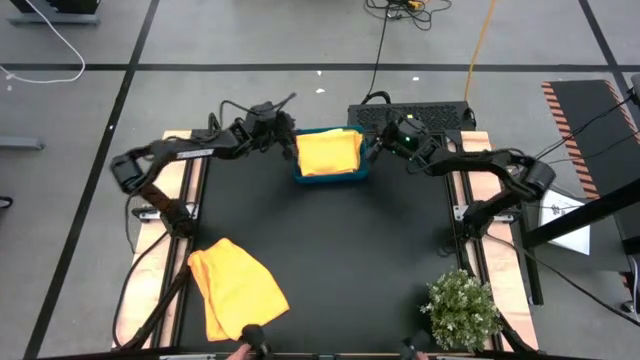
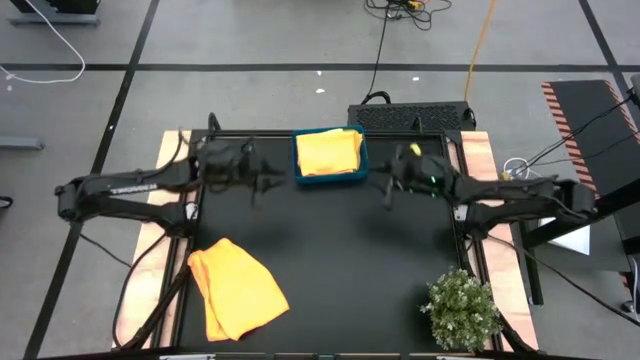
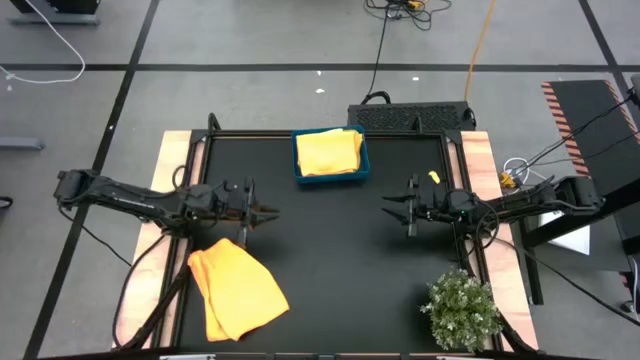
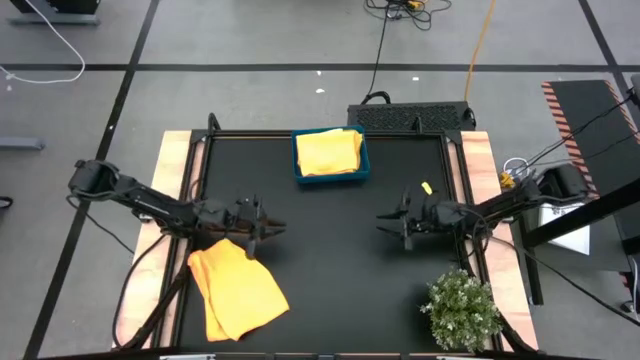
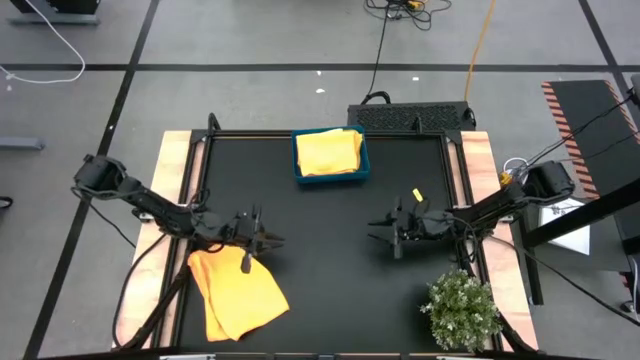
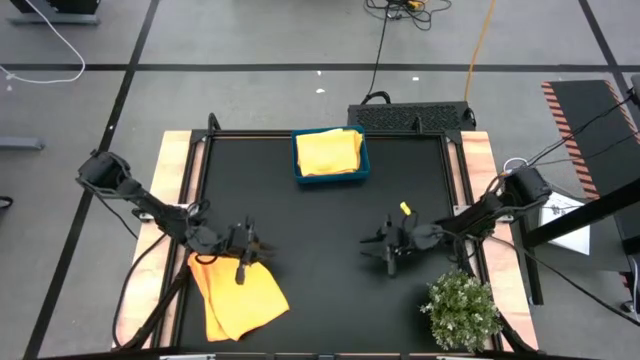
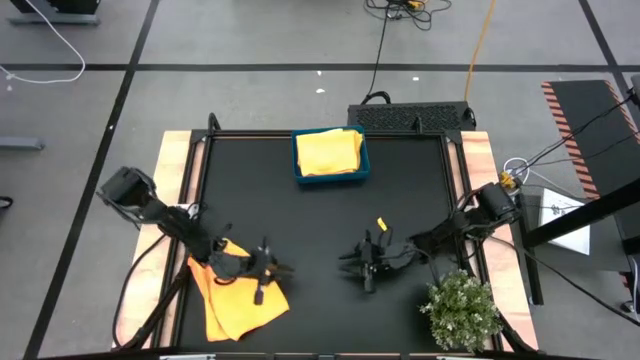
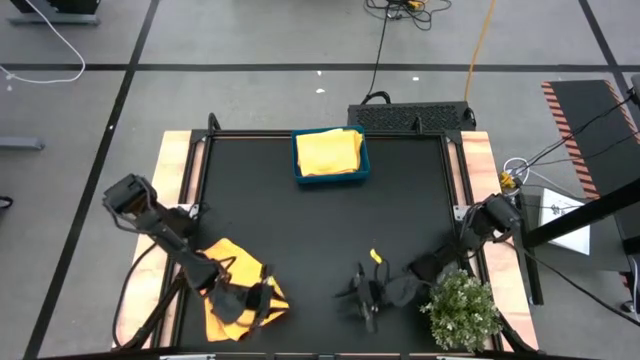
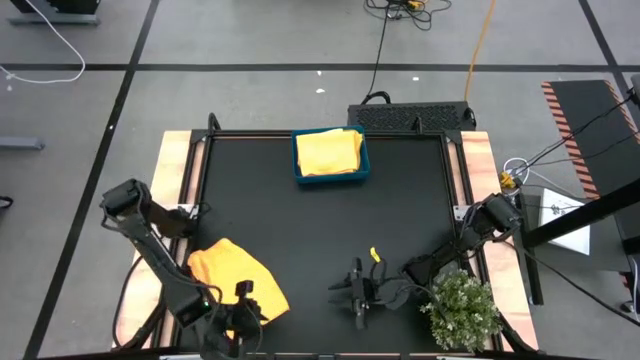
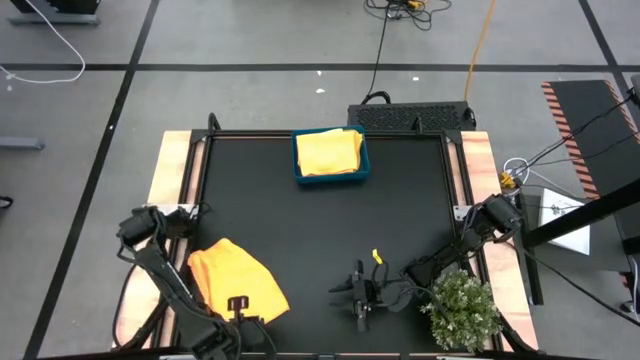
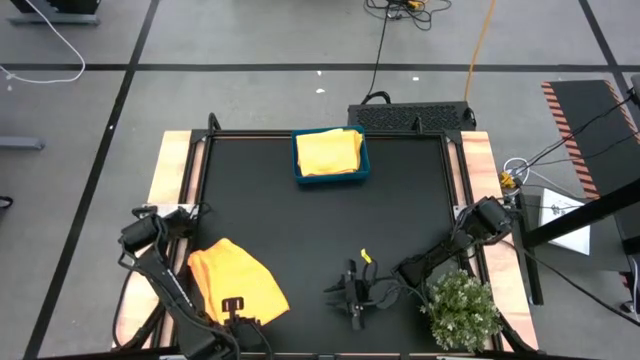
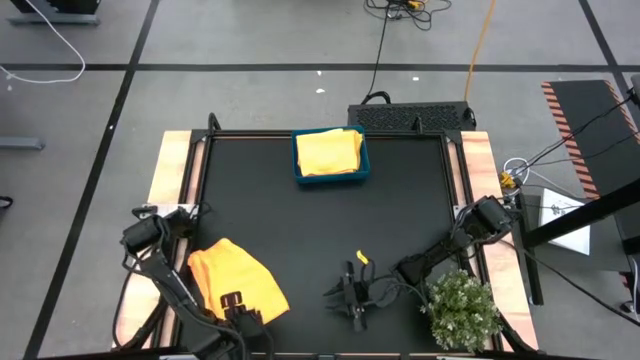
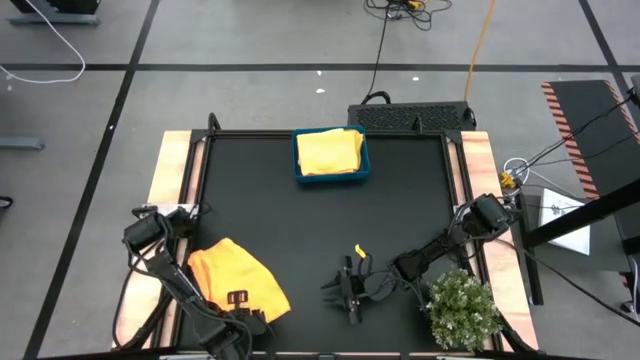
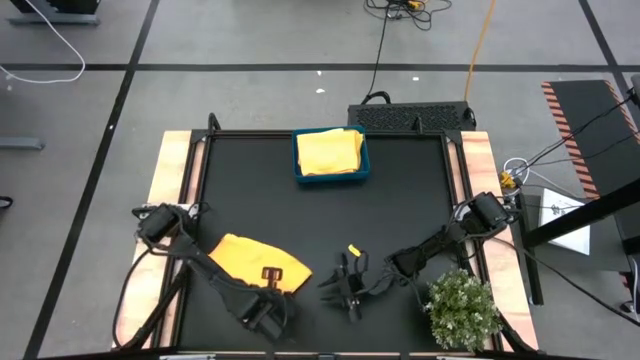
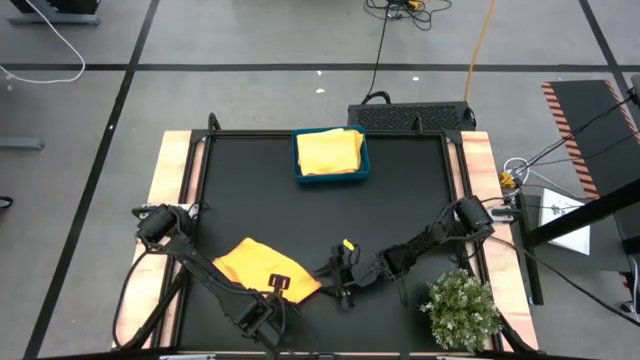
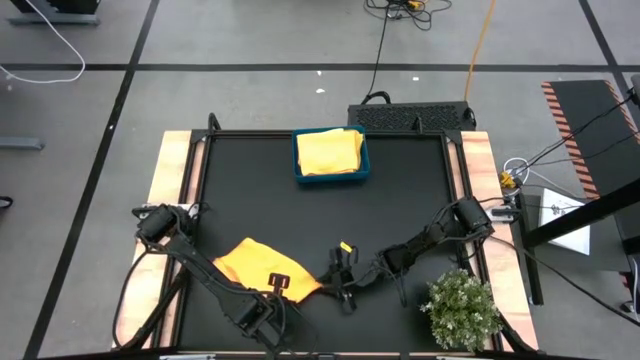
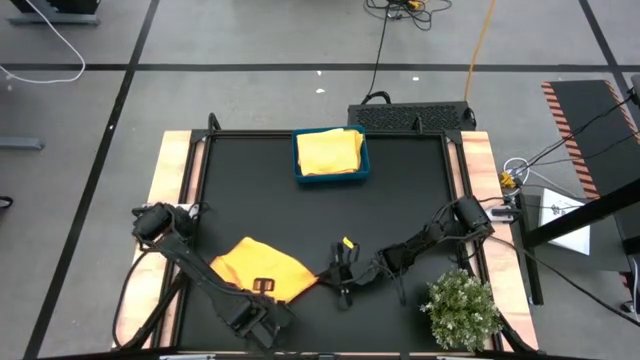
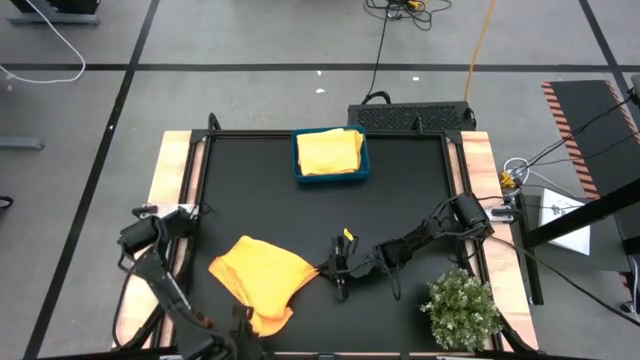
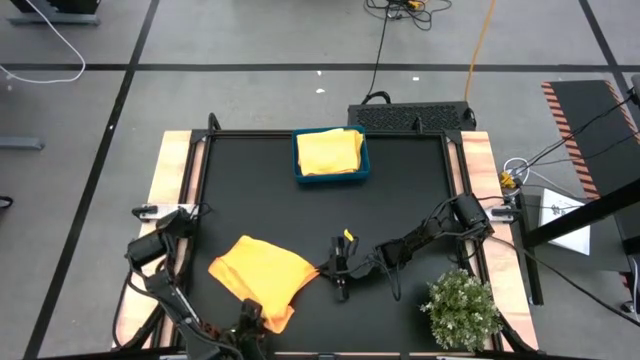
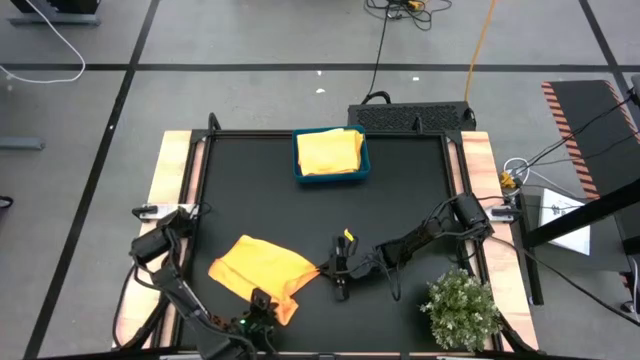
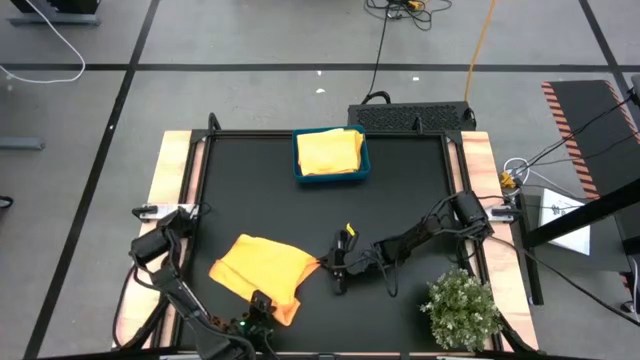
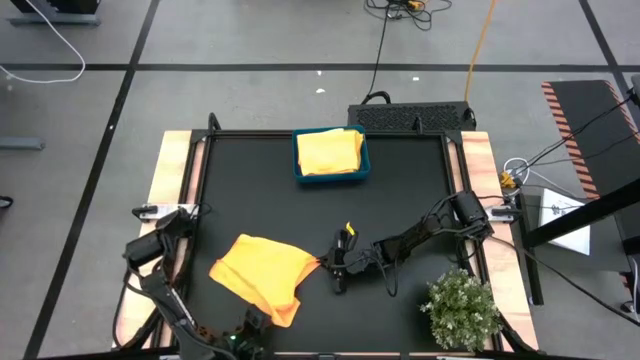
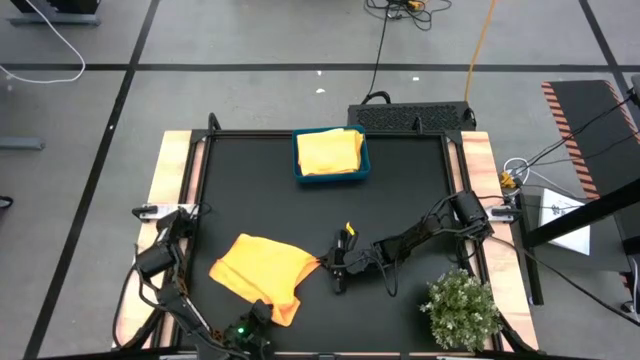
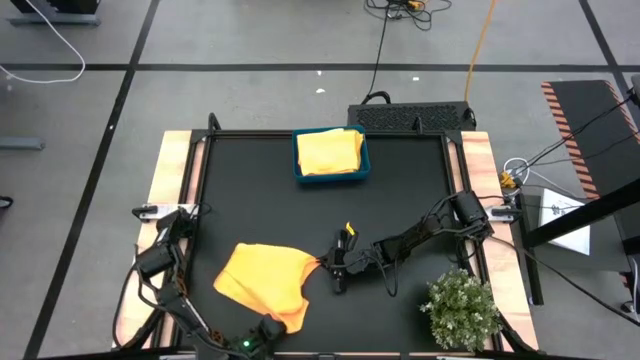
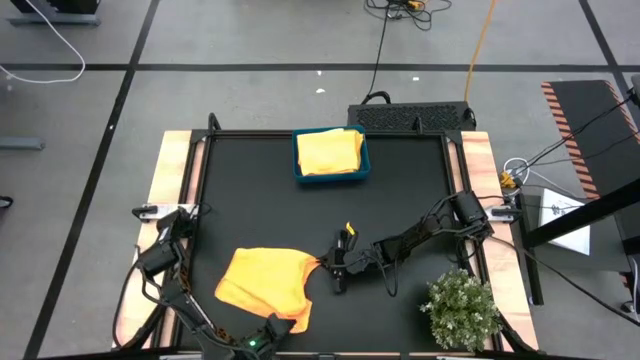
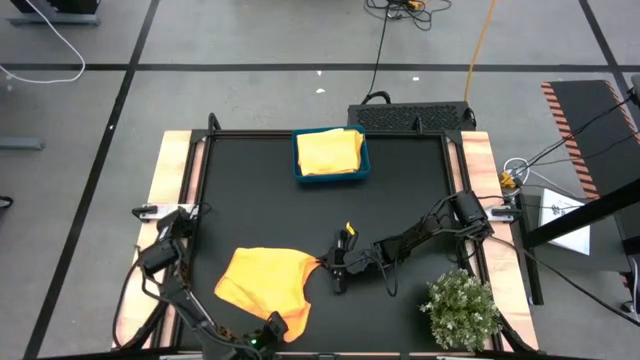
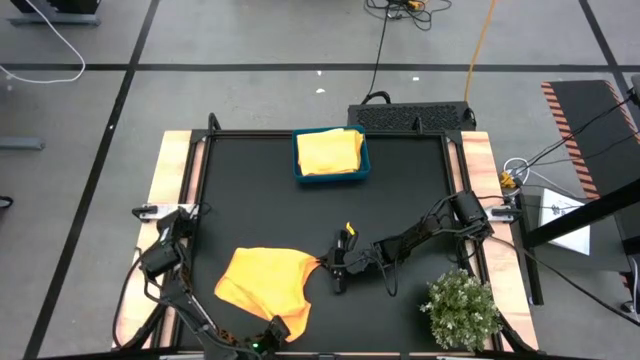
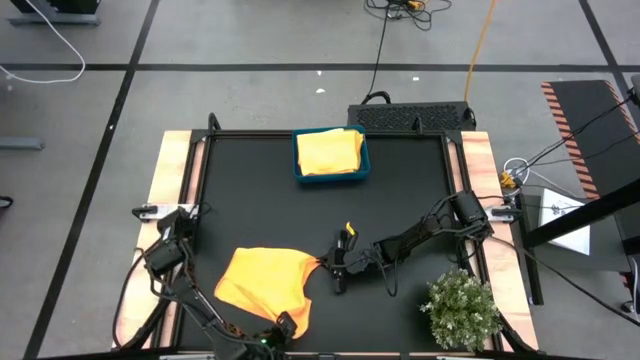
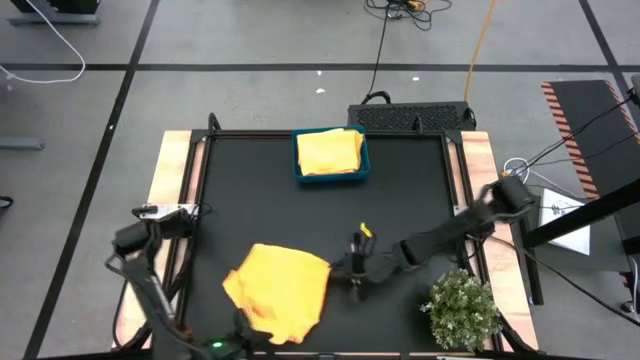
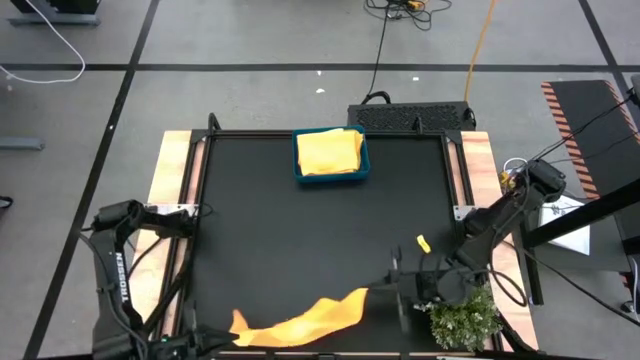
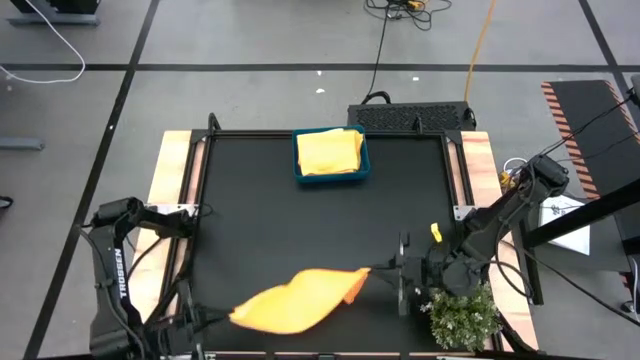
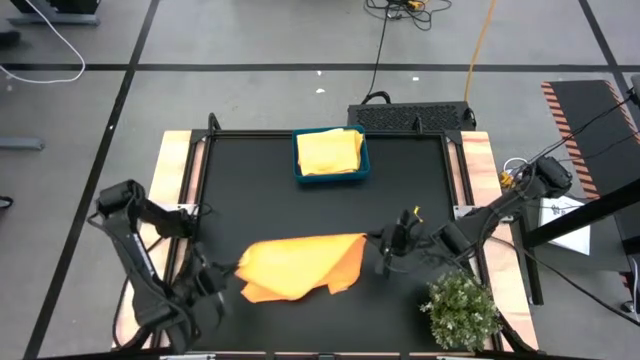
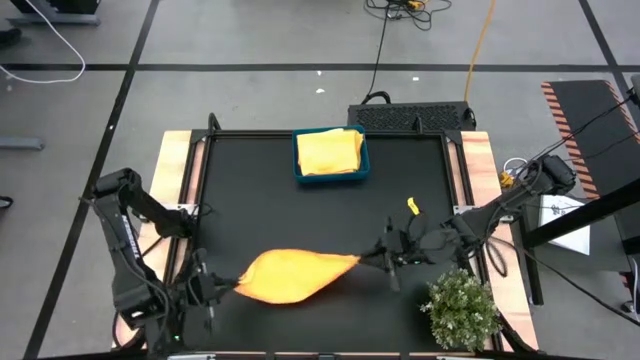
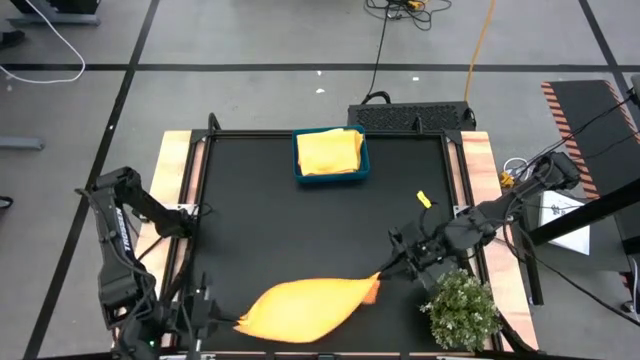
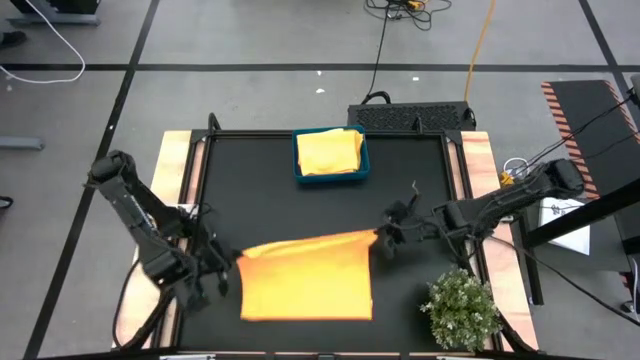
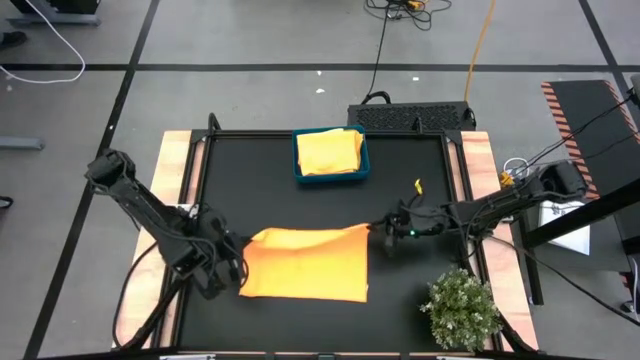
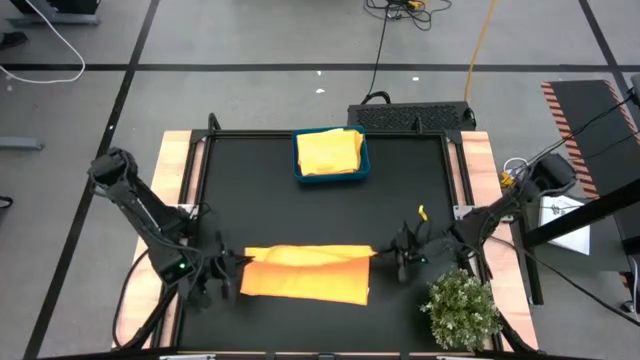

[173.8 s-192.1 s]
Task: Fold microfiber towels
Fold the orange microfiber towel

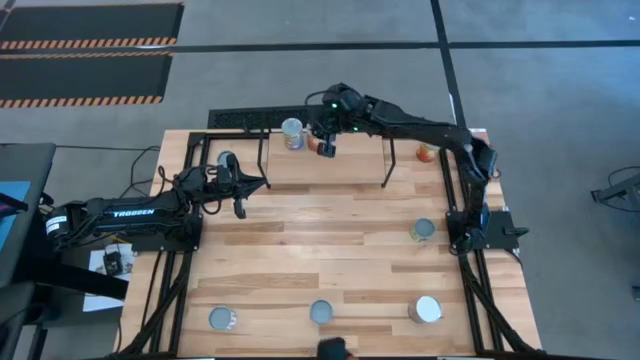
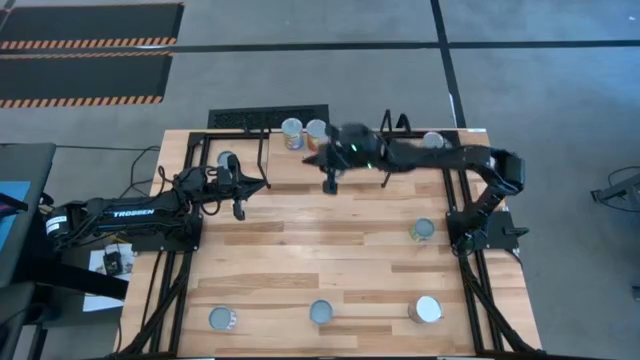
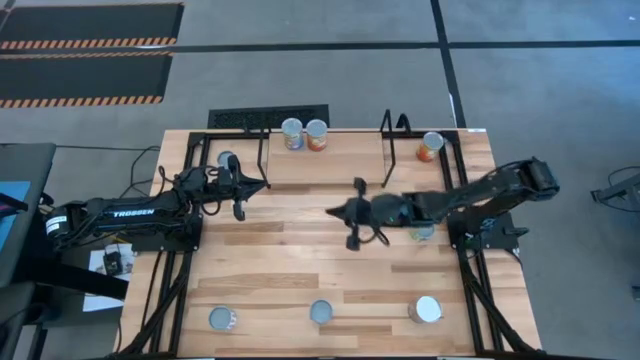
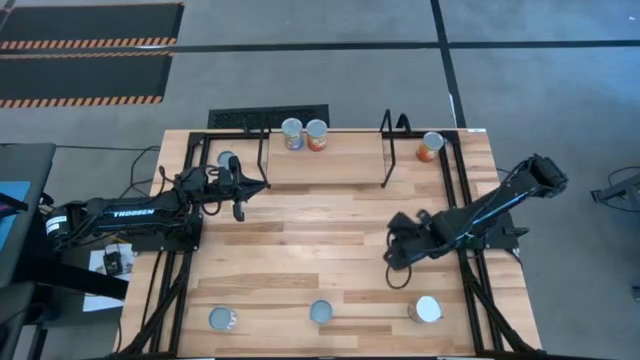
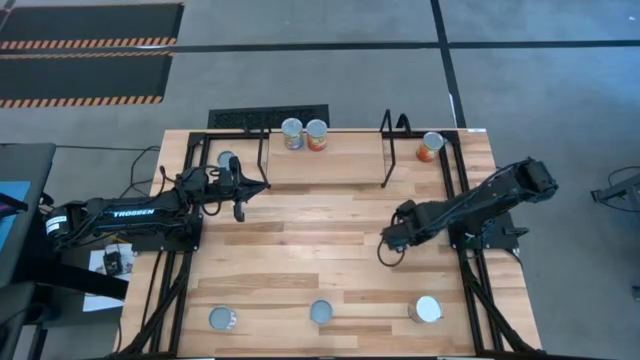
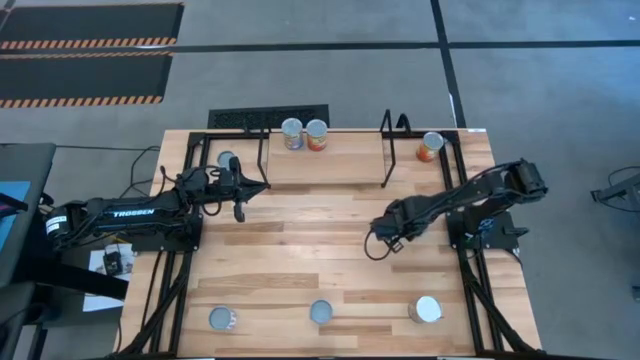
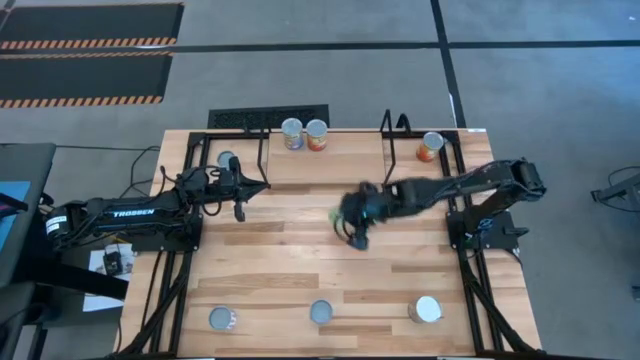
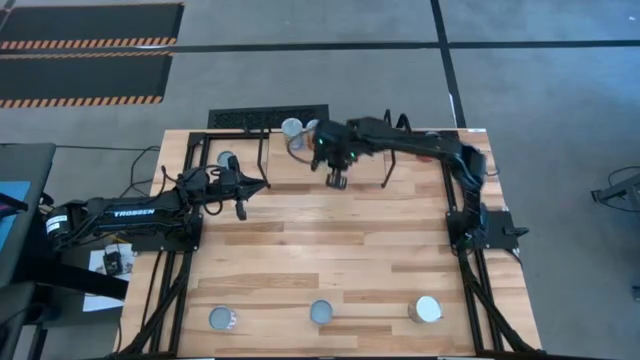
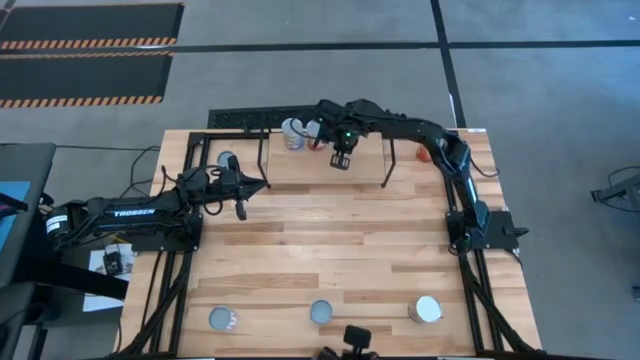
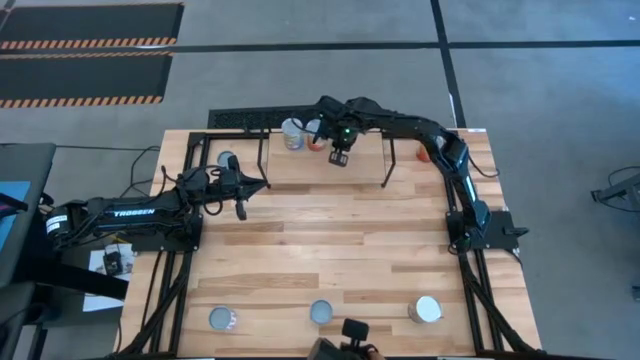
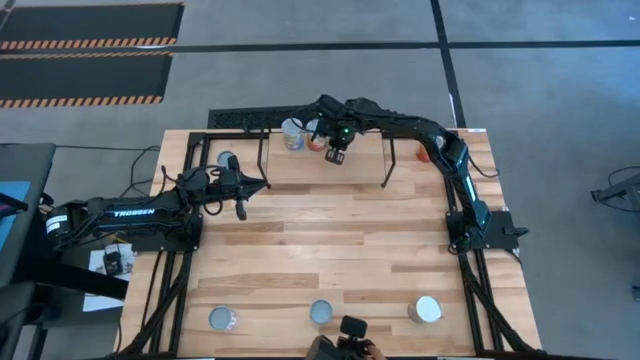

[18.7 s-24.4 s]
Task: Pick and place cans onto a shelf
Put the canned peas on the shelf
